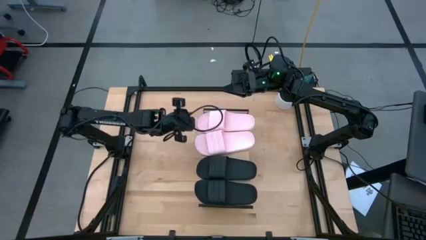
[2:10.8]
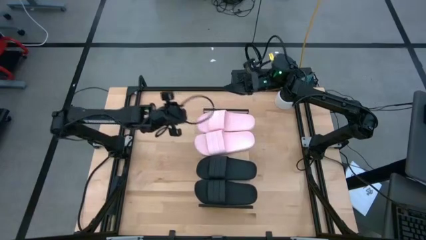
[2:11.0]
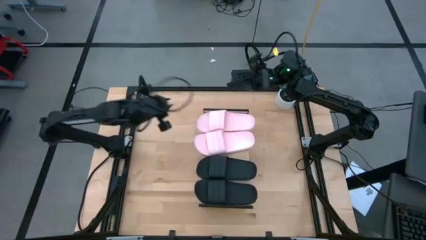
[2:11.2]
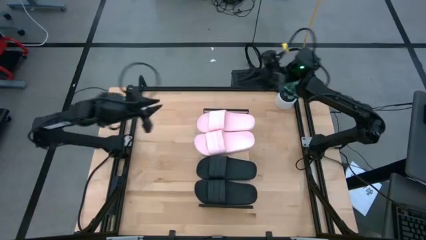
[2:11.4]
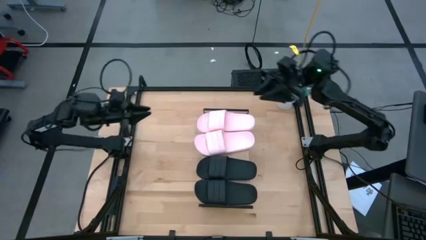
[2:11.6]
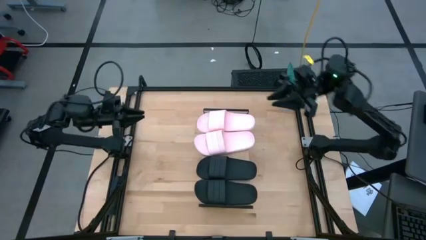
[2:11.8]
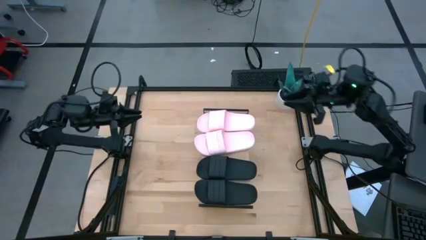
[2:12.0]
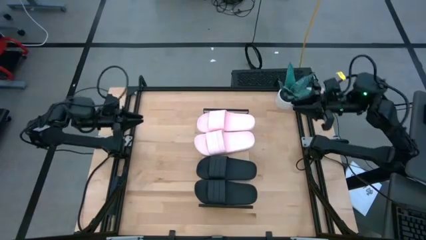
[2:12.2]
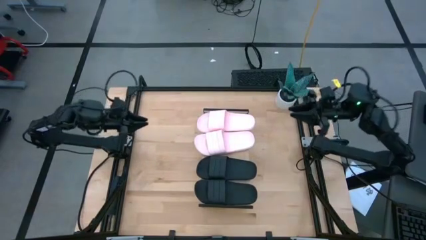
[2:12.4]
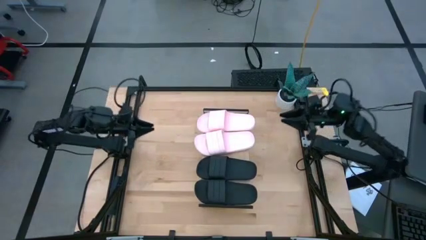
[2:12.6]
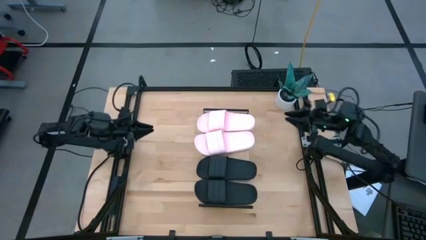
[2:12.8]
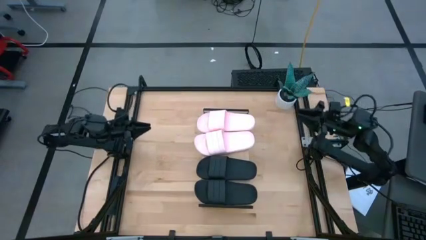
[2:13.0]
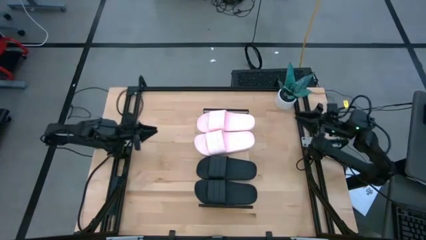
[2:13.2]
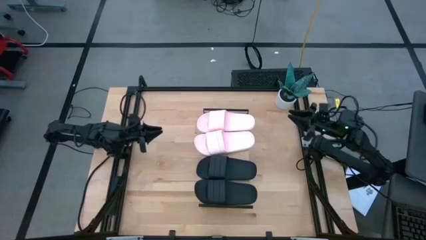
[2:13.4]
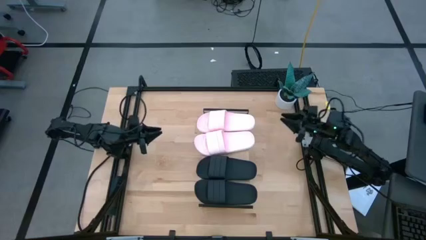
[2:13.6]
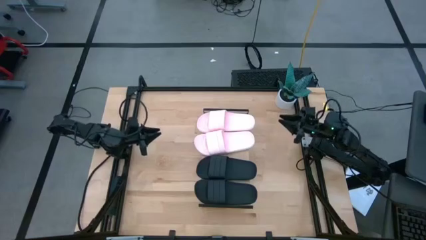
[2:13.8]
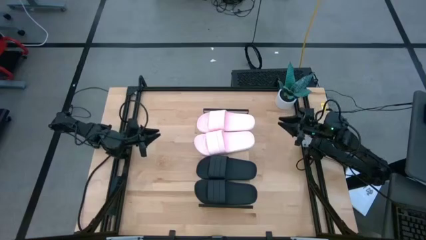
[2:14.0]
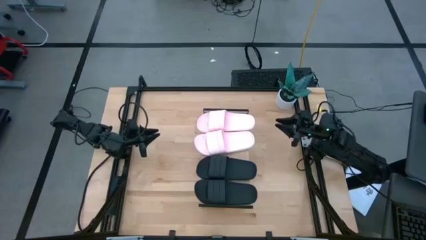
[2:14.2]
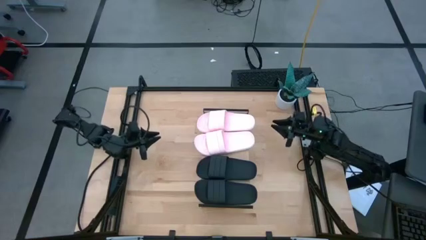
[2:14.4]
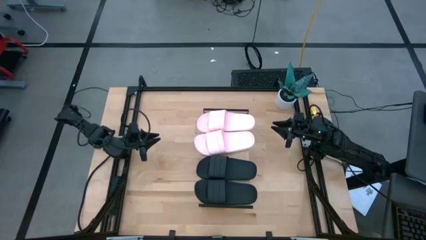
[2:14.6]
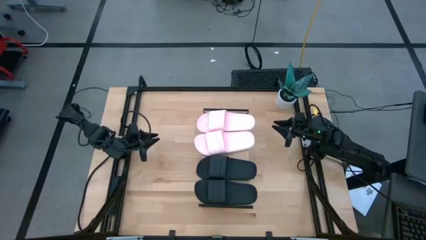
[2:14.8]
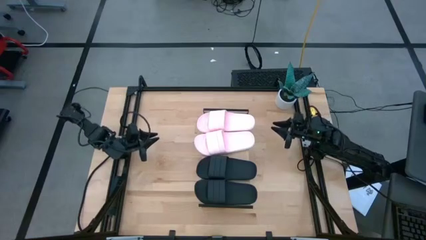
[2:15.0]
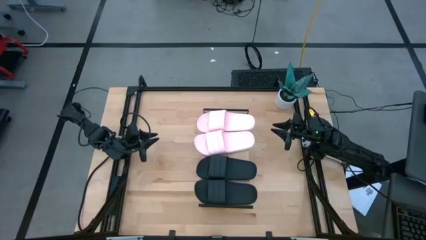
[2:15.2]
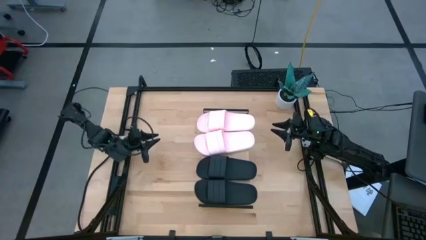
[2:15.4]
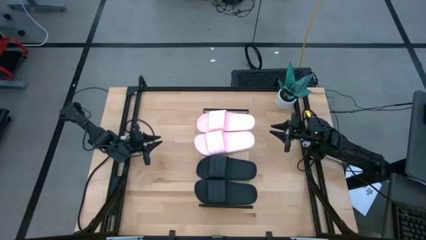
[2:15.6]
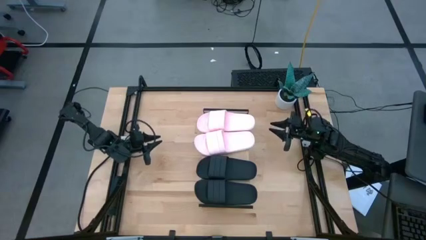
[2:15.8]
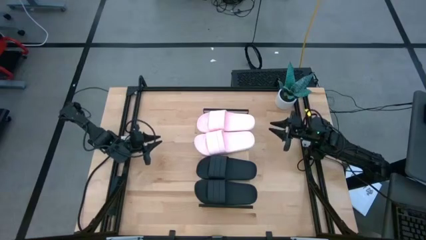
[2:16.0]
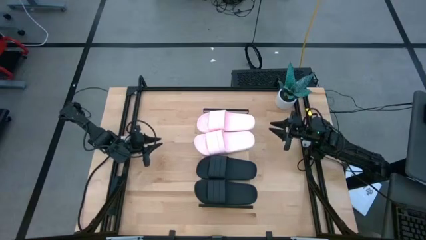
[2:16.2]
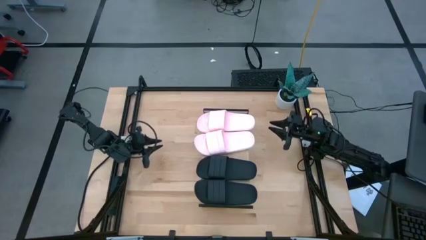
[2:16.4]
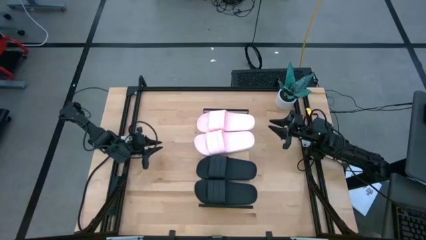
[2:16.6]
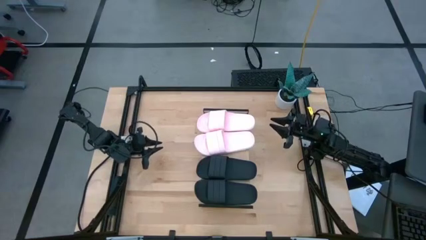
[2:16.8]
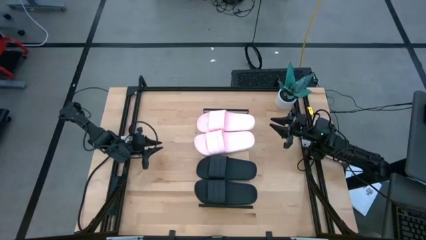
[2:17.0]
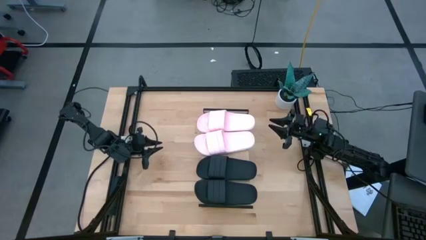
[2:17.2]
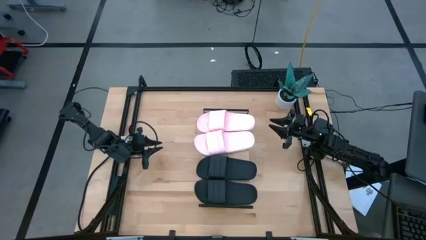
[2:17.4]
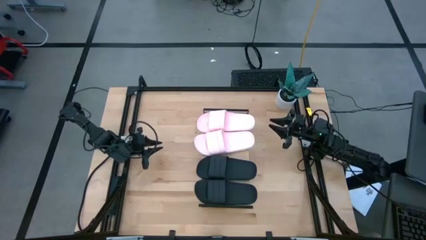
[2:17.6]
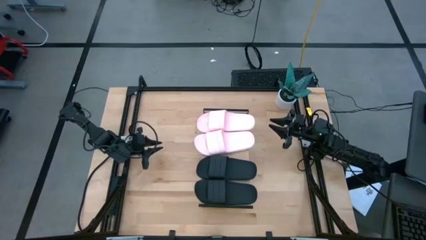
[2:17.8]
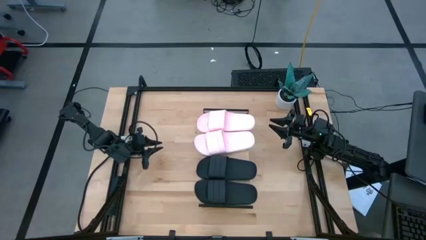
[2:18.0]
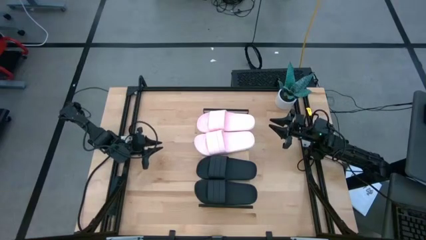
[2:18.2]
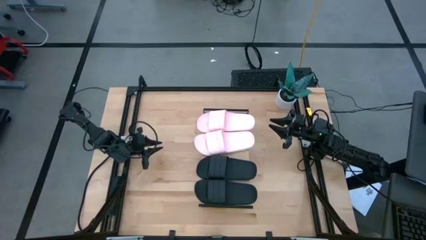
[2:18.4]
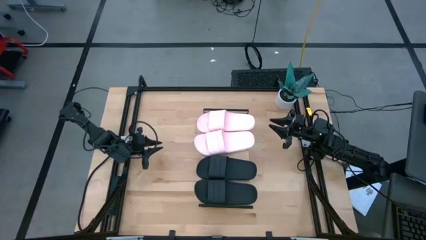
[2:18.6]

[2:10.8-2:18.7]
Task: Pick and place slides into the shelf
Return to Home Position

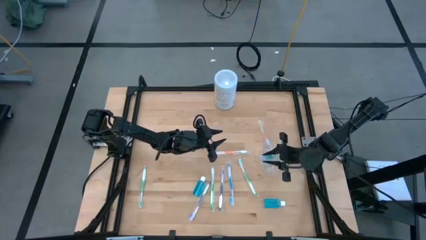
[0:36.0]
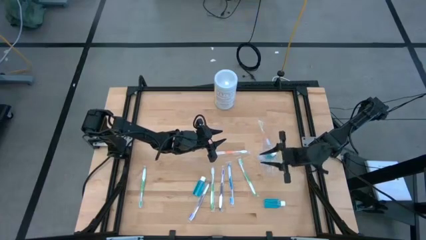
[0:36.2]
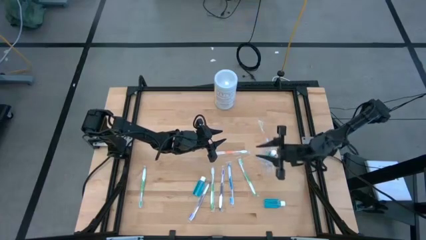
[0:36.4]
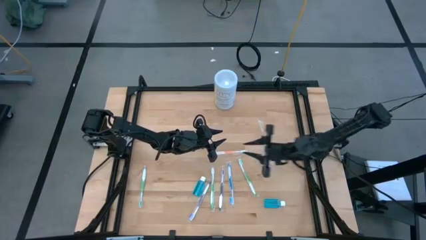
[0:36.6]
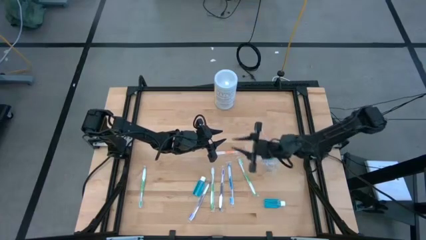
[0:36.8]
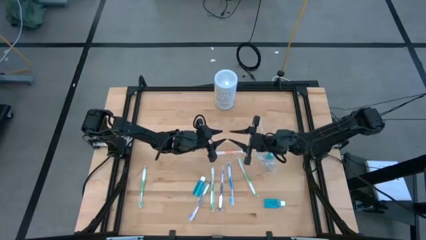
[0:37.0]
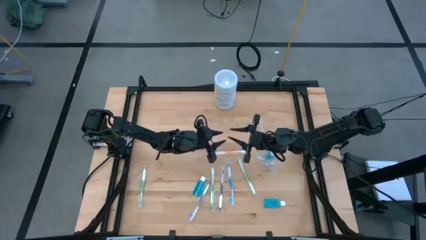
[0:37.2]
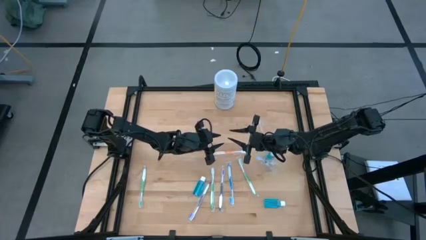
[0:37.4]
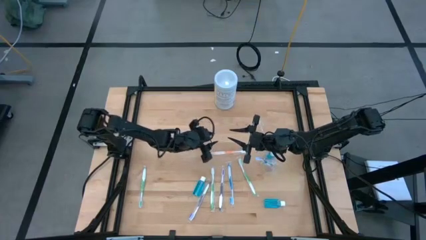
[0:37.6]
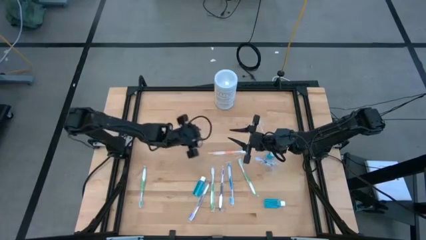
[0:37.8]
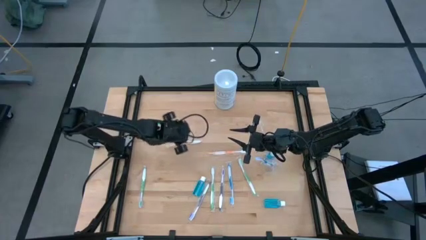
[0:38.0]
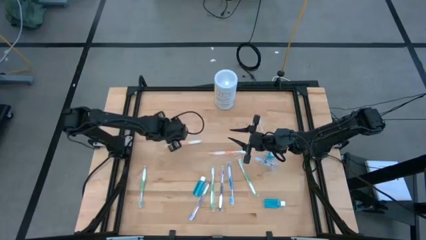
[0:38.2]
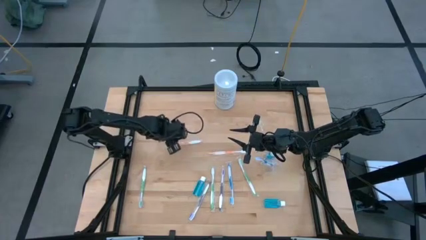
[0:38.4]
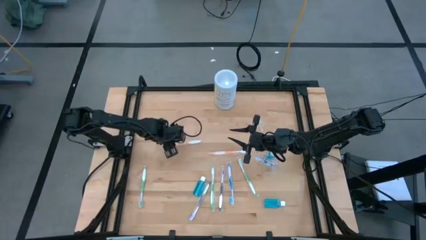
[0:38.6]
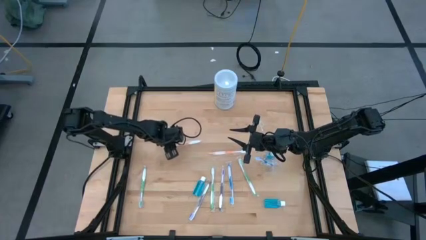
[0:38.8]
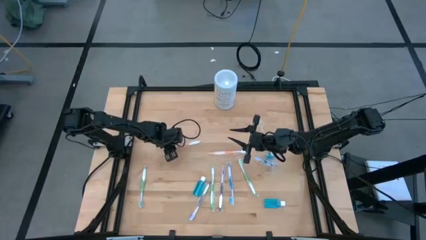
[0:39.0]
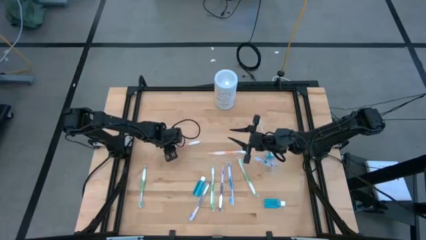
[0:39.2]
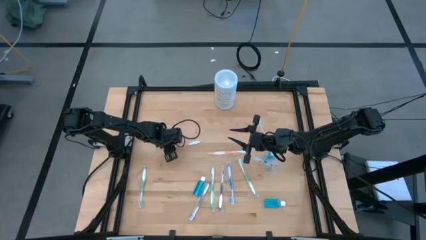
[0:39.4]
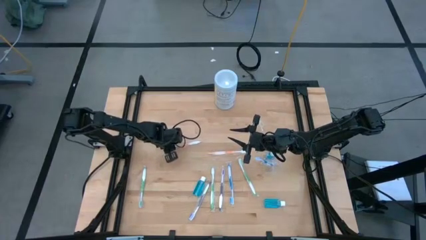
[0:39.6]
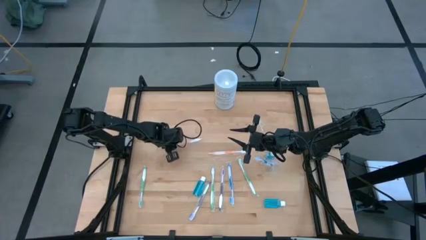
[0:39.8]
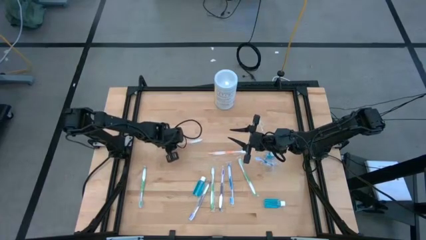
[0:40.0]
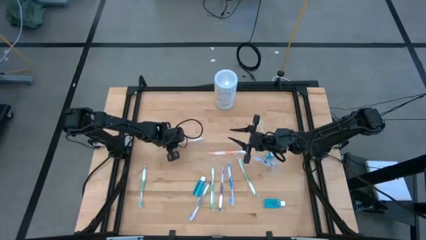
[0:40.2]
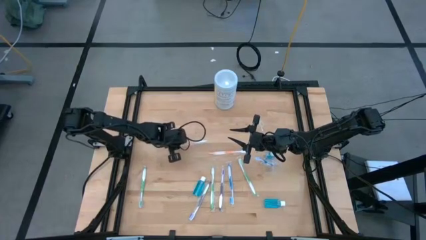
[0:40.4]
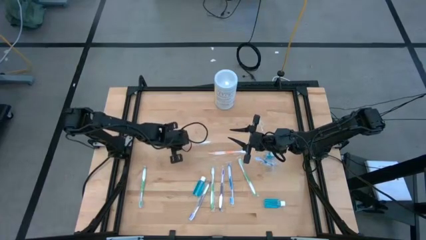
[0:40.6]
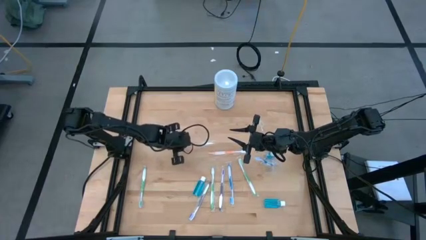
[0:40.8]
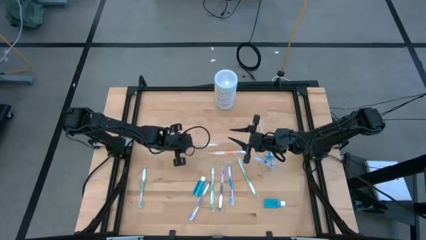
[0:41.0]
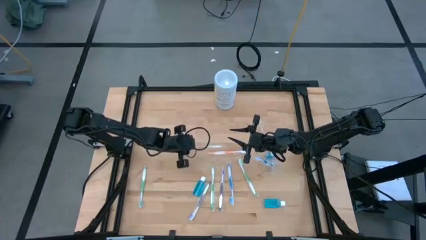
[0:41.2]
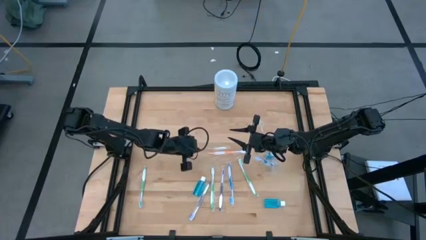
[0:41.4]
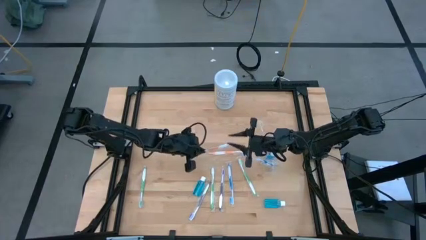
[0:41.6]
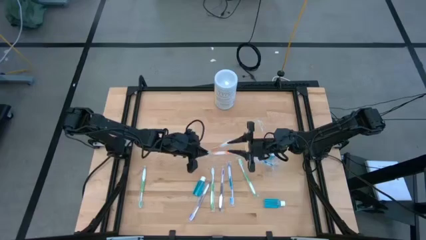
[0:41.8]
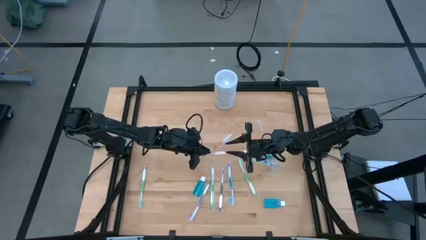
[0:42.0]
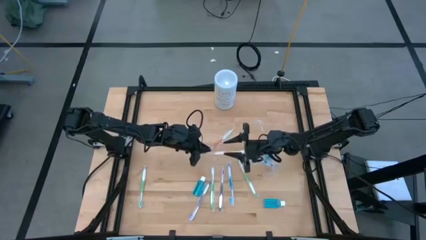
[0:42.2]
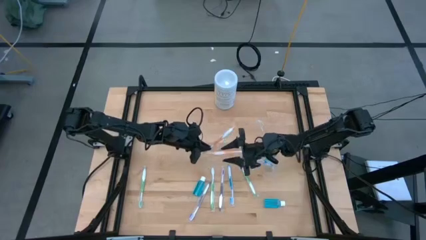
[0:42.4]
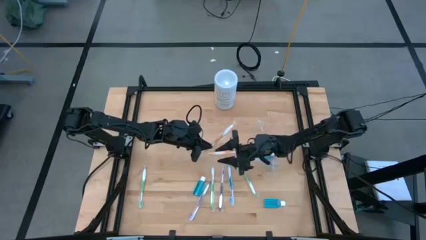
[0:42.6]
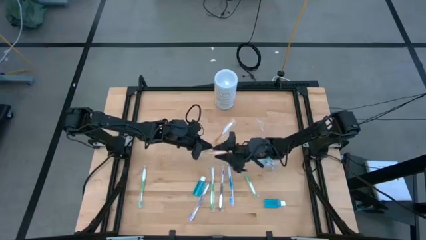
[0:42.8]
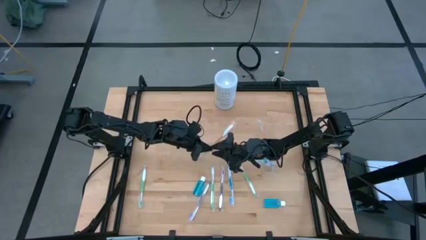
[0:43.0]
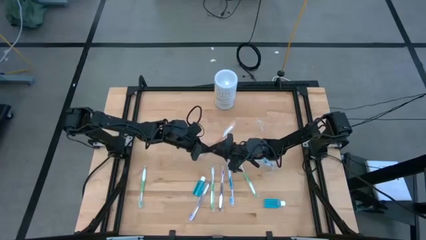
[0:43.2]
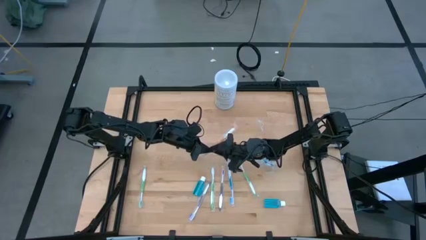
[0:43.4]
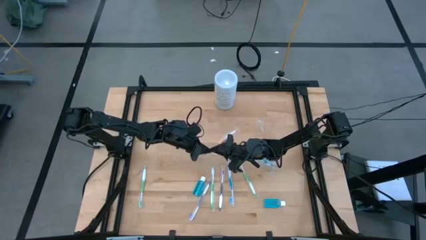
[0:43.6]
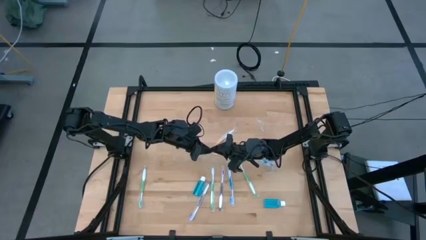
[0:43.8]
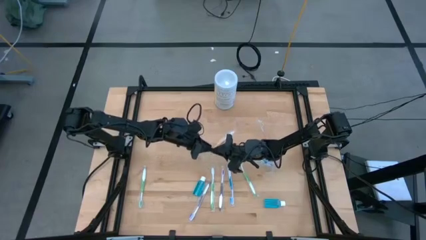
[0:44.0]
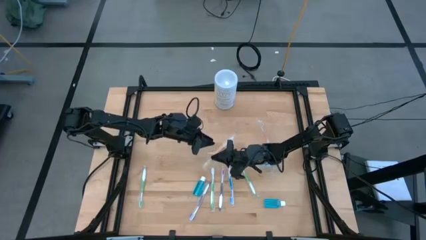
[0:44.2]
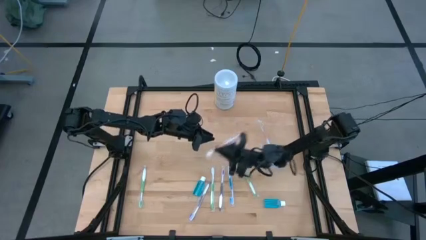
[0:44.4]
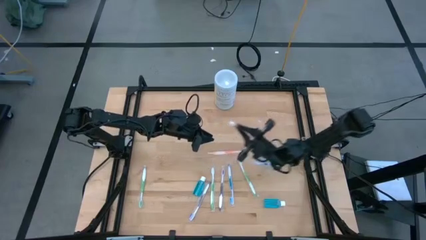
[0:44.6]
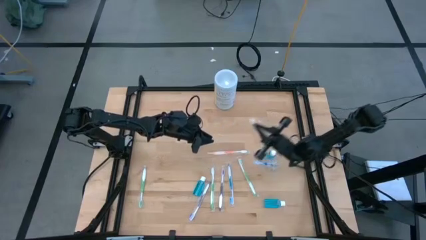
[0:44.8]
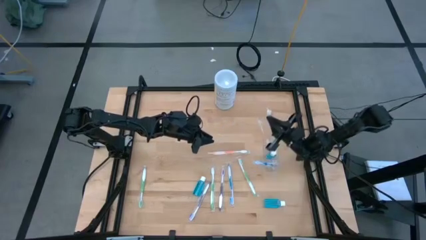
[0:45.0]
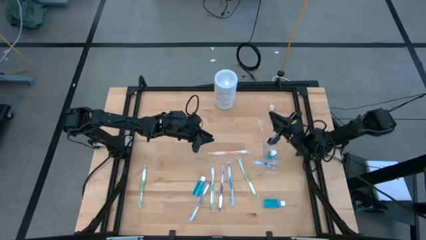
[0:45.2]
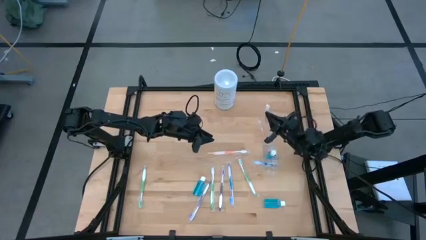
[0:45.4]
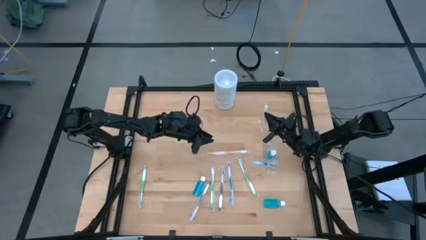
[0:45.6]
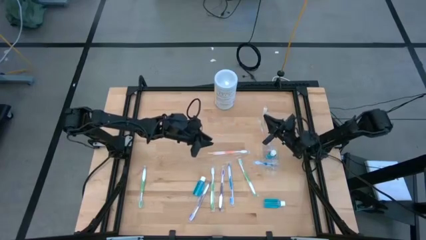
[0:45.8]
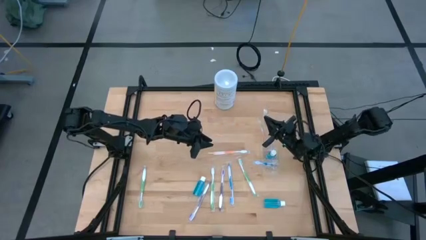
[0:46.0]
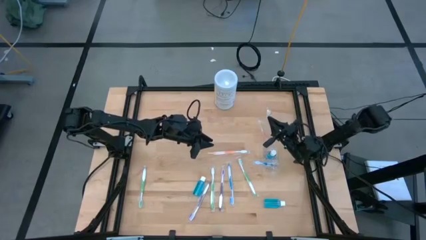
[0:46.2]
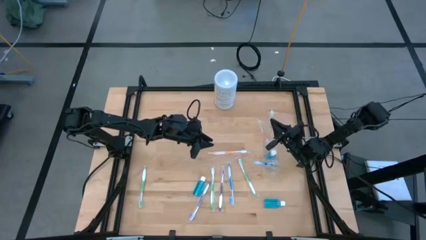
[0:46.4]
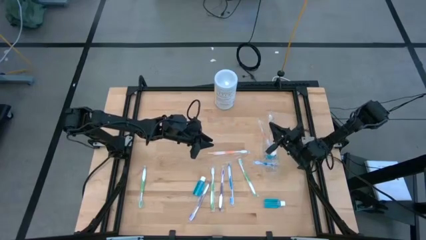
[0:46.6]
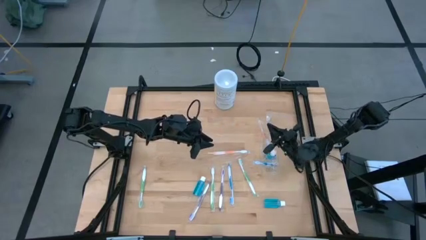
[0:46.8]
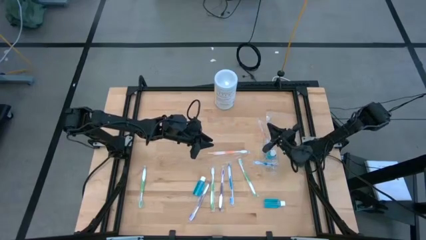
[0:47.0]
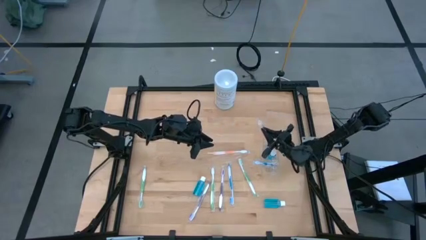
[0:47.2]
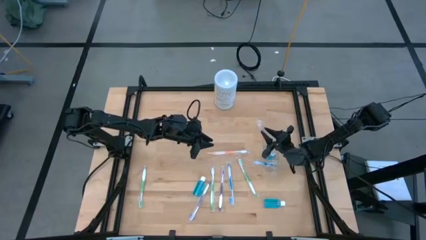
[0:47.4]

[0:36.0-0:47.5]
Task: Pick & Place toothbrushing station
Put the left orange toothbrush into the transparent organizer
